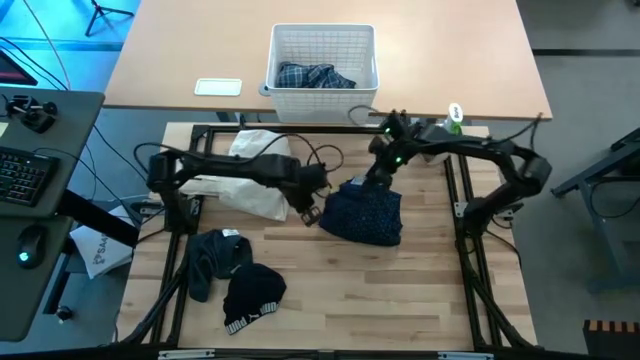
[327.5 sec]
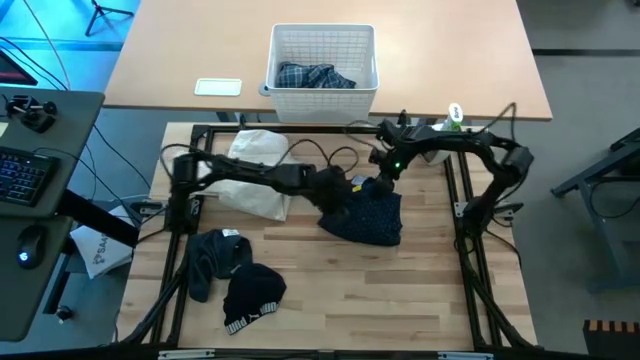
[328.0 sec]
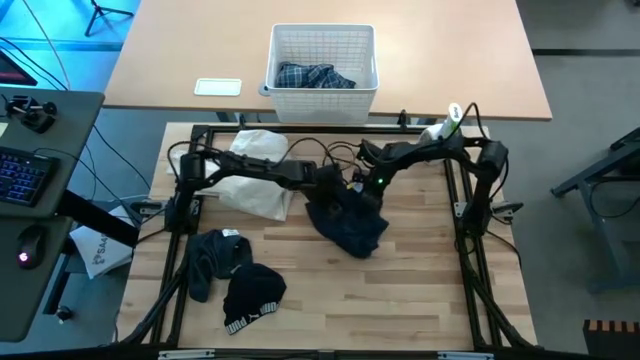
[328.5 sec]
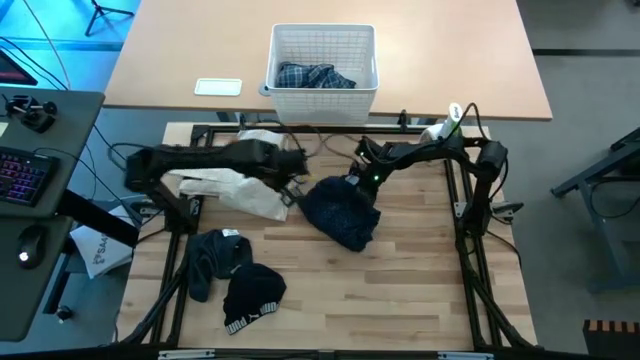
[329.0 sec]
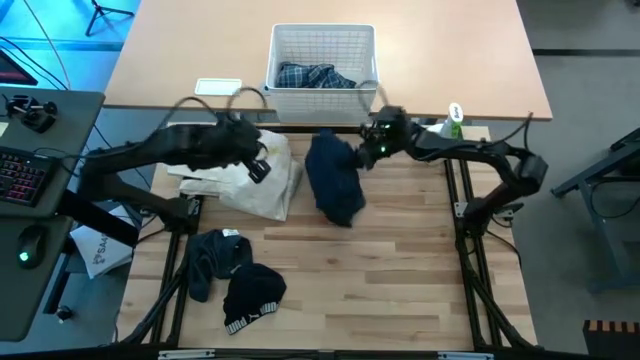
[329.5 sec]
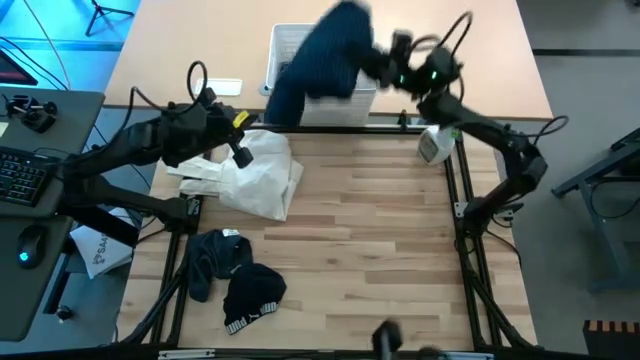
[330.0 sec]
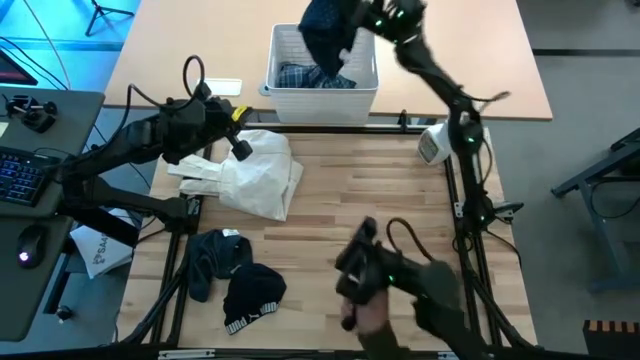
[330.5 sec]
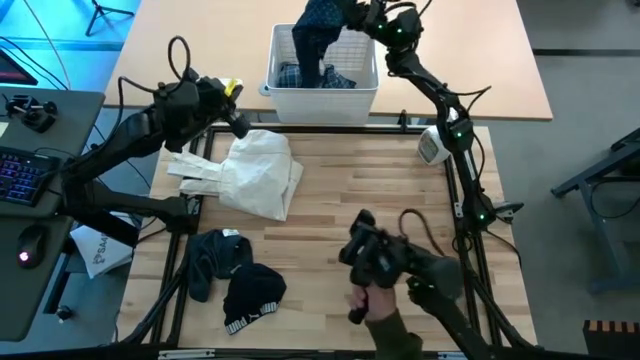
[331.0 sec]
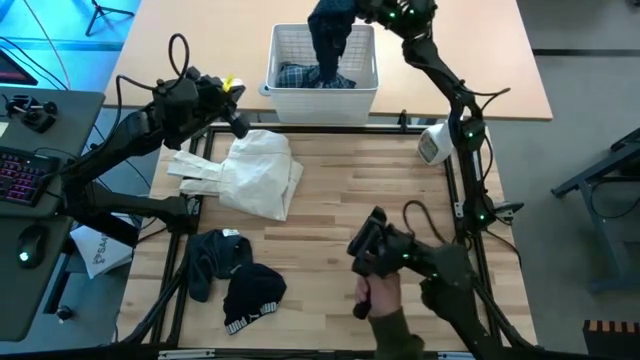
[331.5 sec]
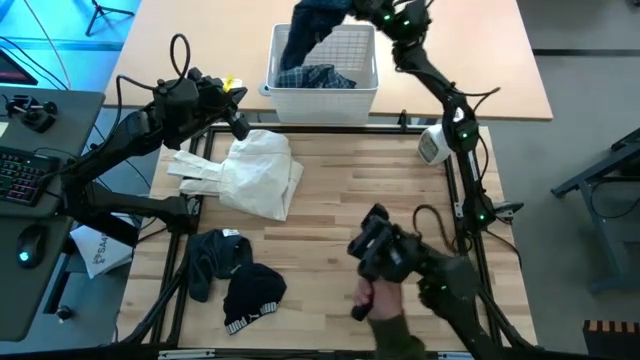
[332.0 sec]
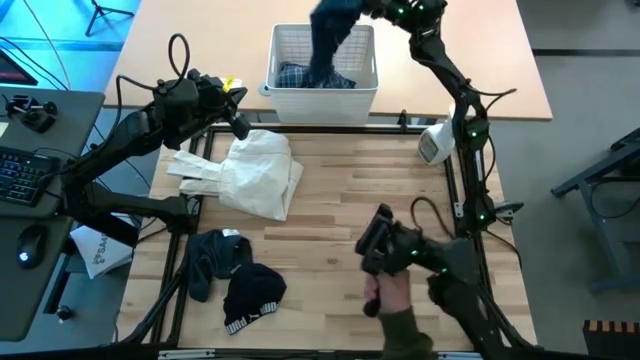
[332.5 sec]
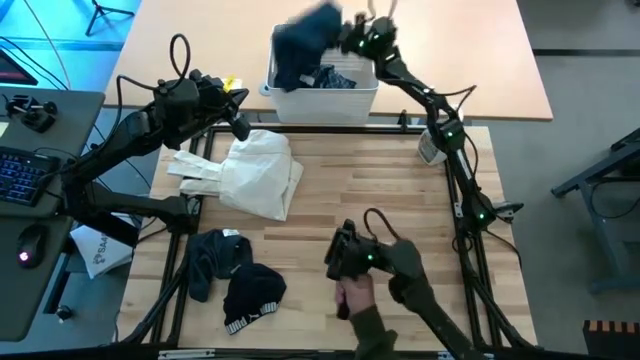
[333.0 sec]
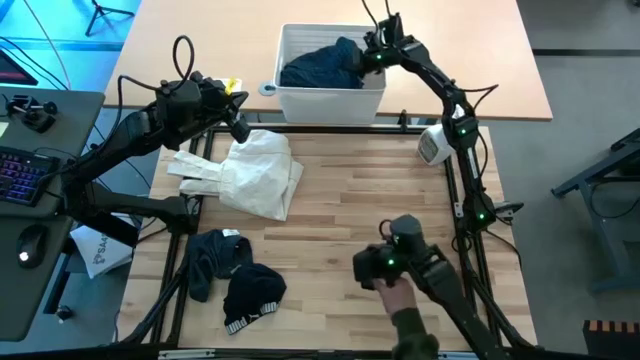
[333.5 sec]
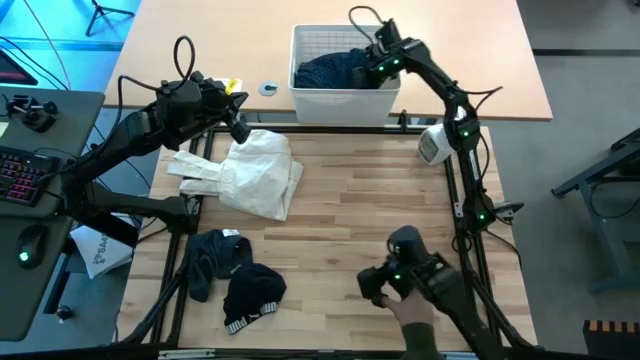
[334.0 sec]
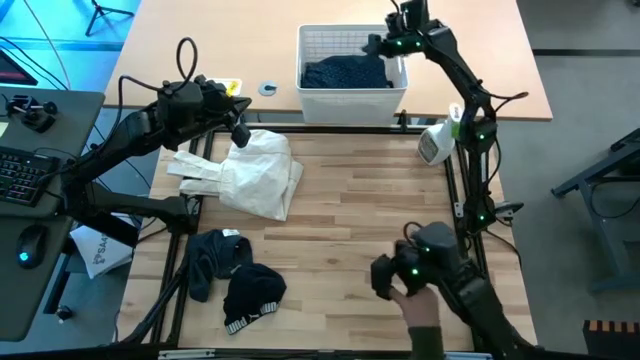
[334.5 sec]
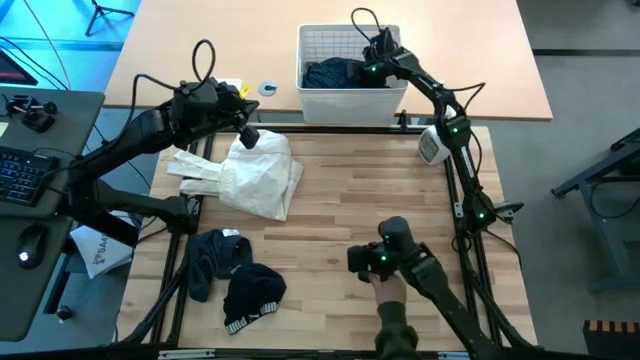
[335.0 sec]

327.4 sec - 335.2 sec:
Task: Fold laundry
Put the navy blue polo shirt into the laundry bin

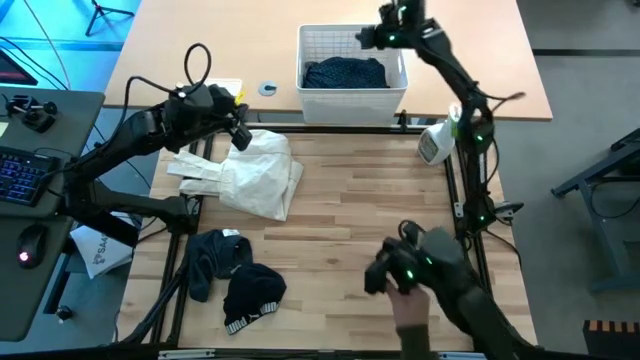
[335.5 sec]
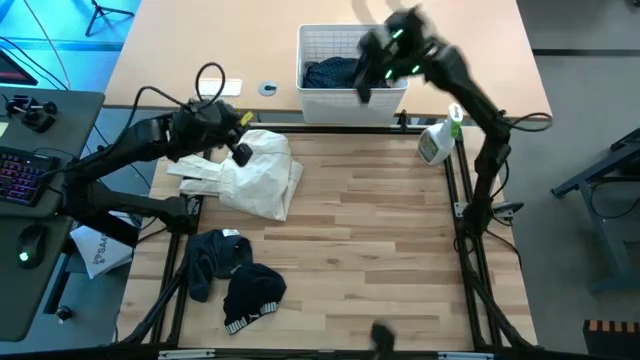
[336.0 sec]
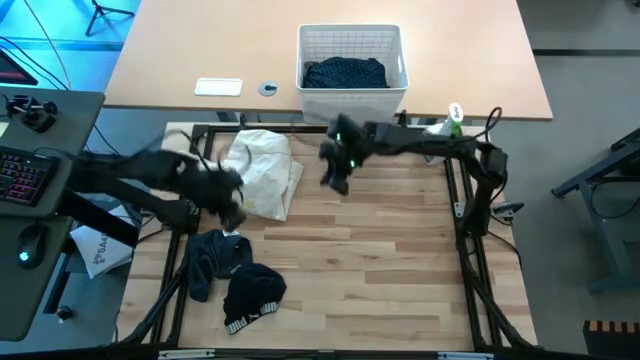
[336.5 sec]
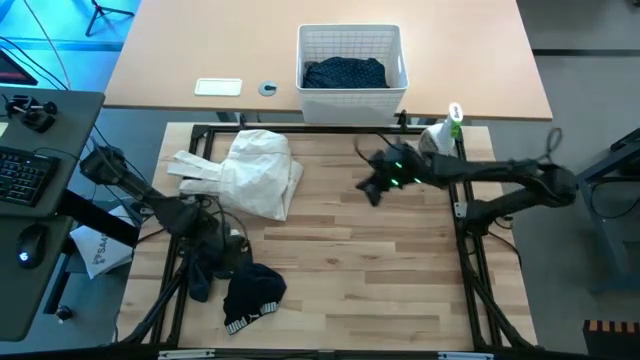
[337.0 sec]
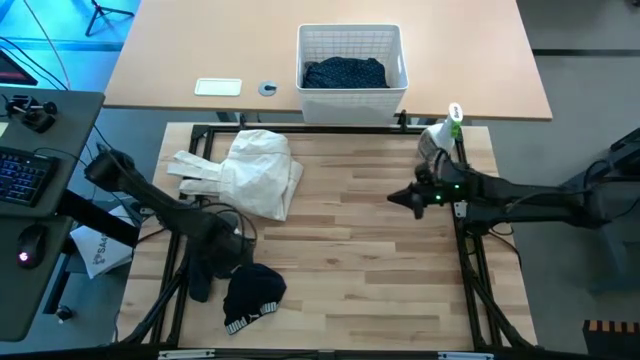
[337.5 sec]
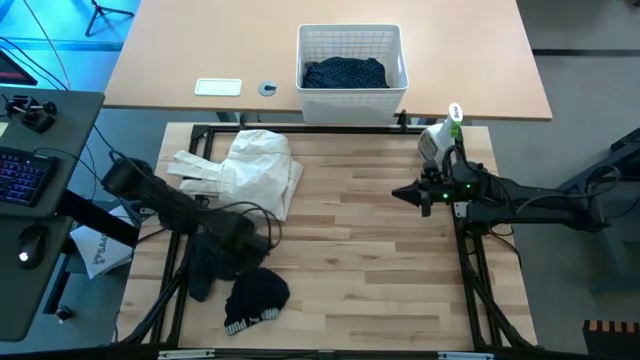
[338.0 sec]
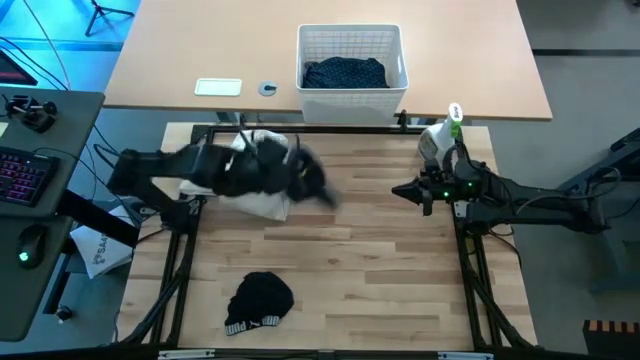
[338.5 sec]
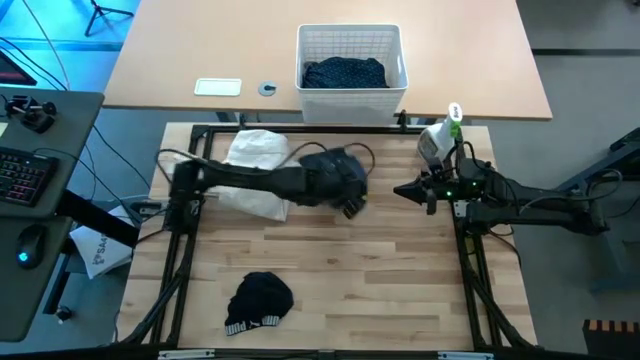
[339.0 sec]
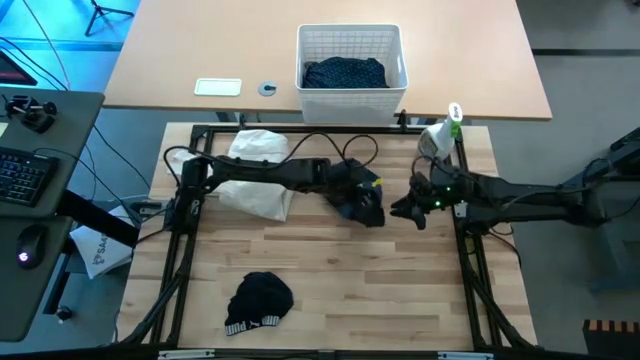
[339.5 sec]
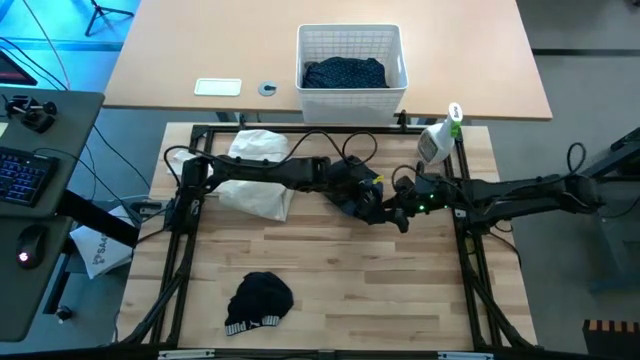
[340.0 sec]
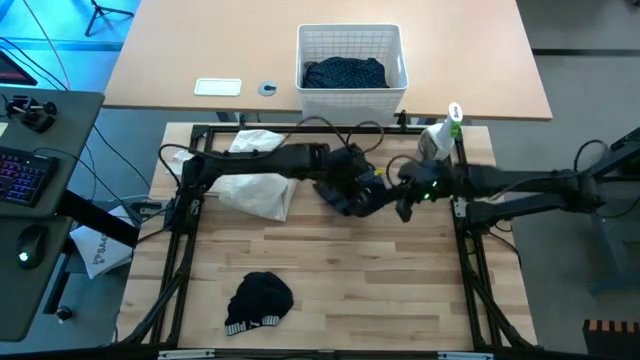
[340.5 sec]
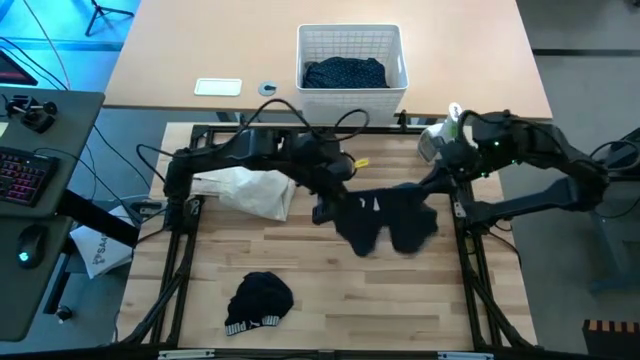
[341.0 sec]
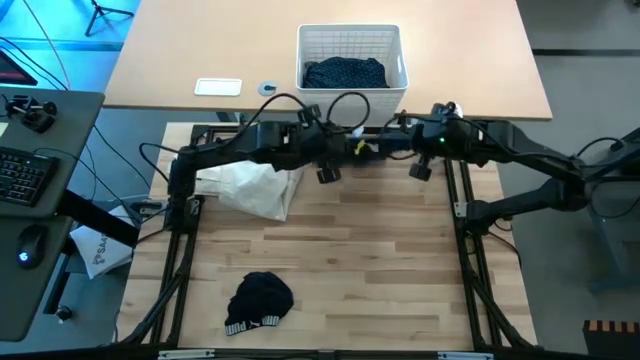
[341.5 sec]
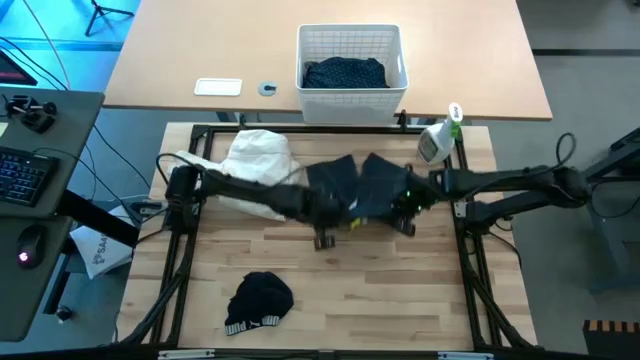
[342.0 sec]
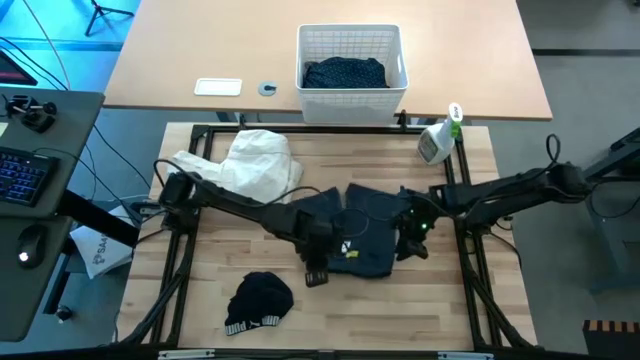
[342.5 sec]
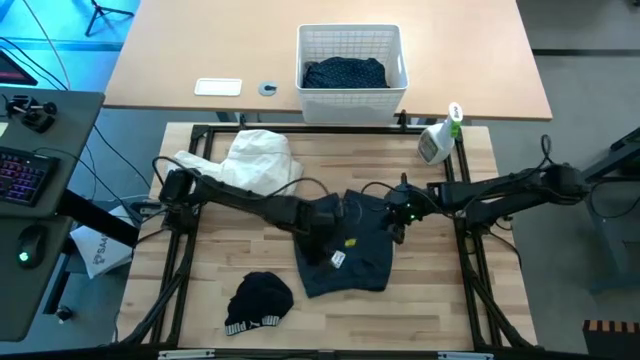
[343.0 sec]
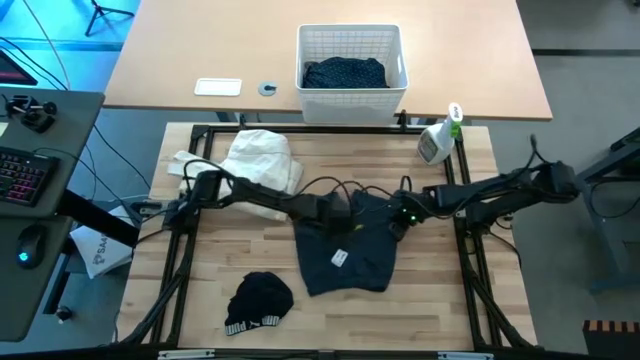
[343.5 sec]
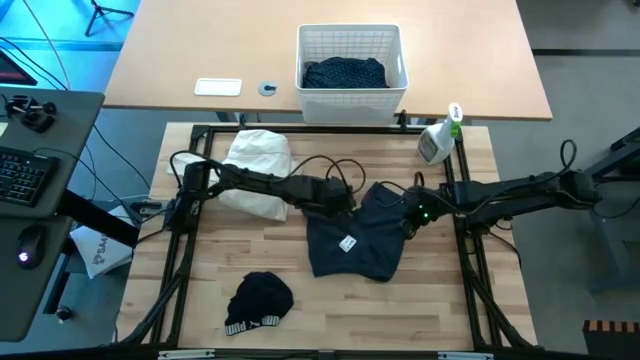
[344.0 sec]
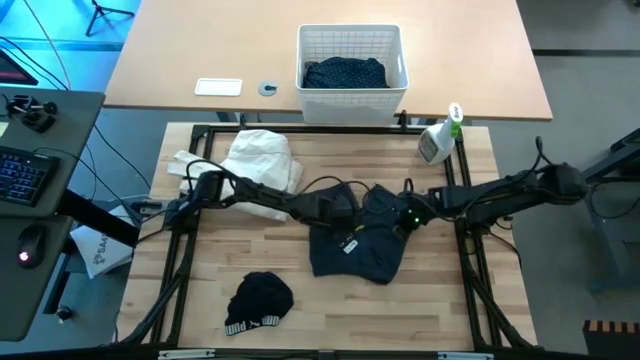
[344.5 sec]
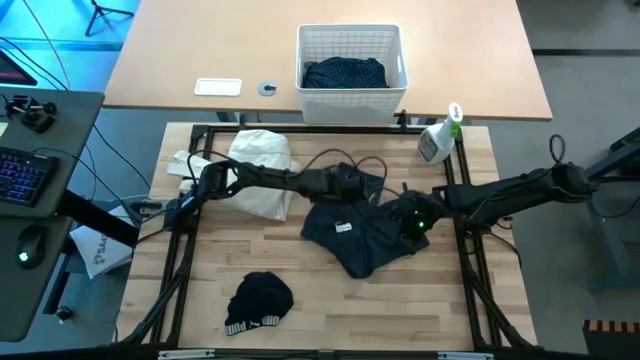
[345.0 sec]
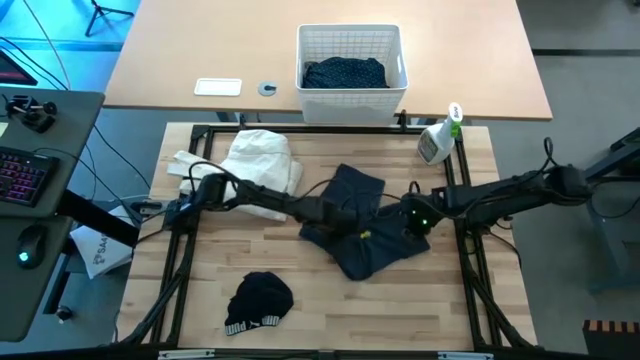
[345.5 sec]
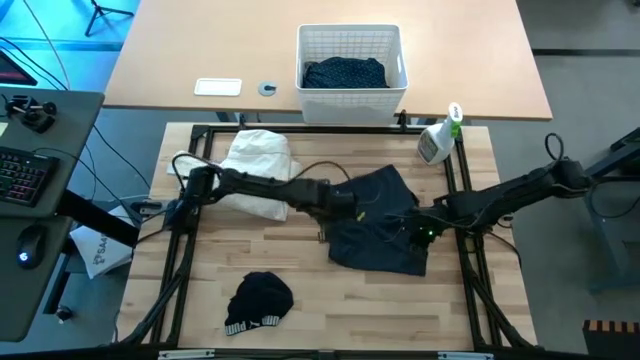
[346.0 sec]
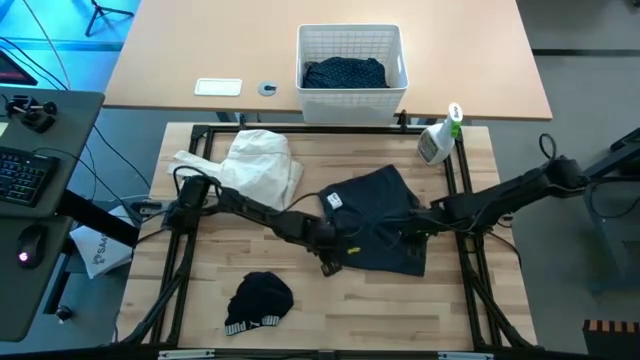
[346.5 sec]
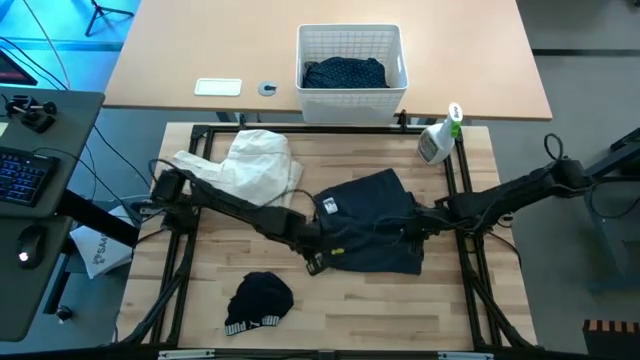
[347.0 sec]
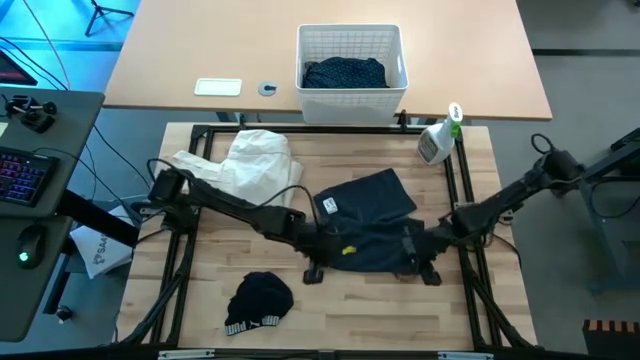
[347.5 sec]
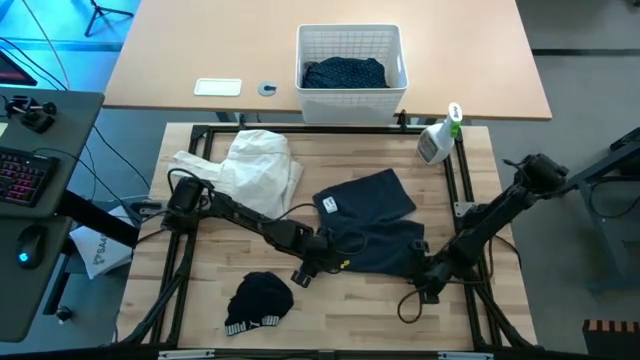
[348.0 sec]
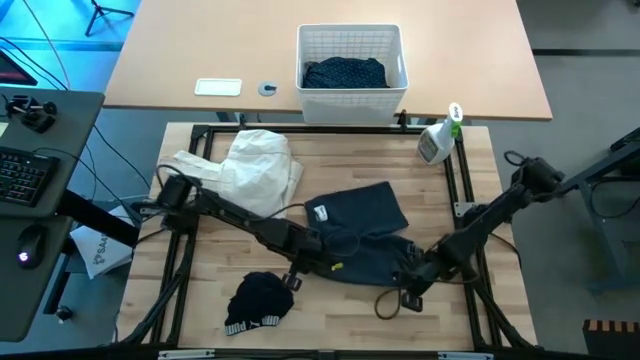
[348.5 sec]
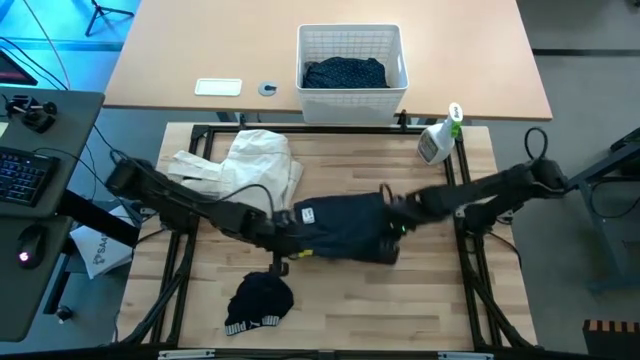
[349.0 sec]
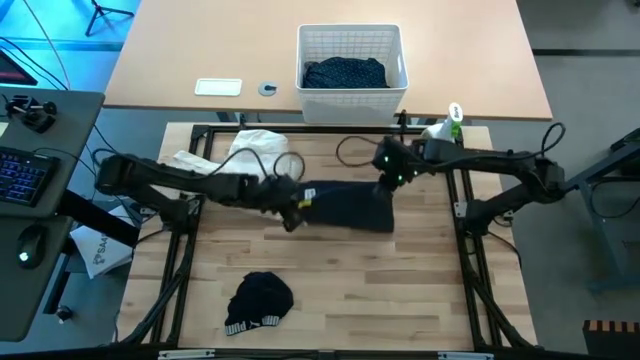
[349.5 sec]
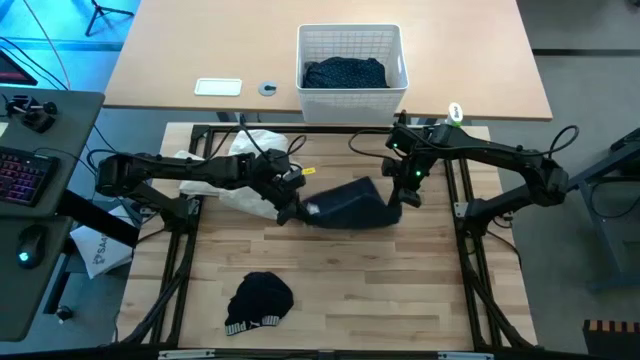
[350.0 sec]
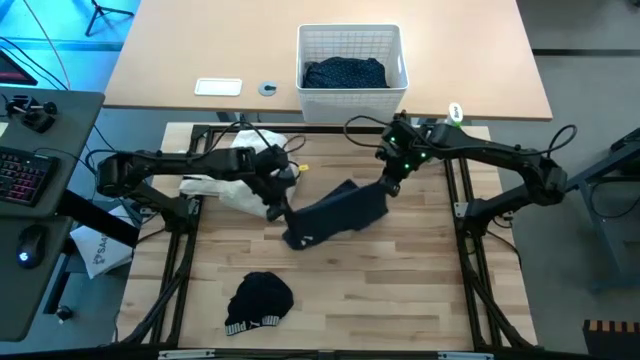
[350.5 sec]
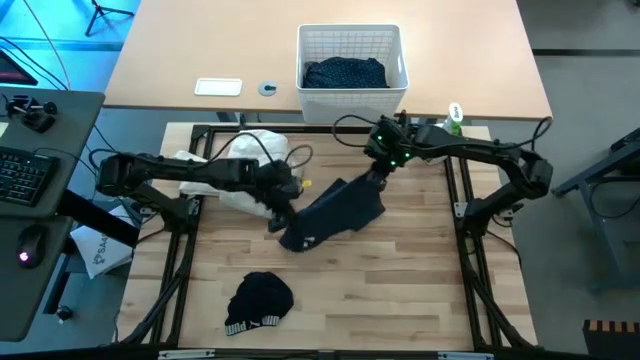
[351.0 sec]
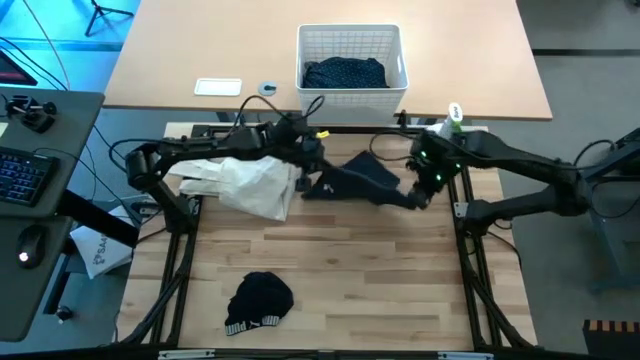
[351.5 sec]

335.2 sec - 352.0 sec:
Fold the blue shorts
